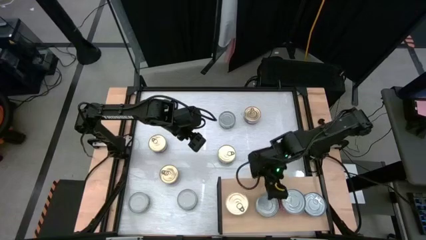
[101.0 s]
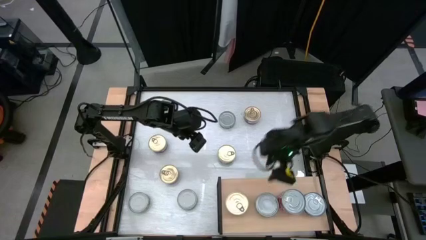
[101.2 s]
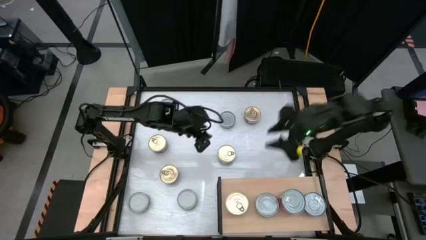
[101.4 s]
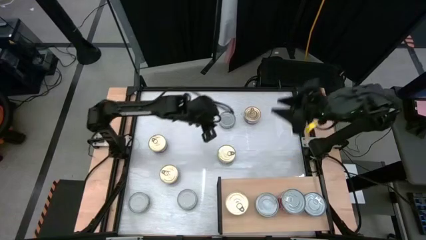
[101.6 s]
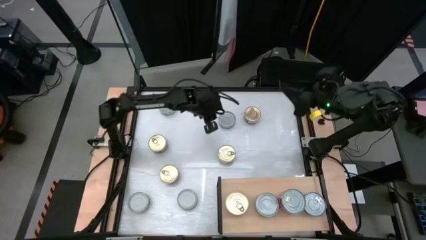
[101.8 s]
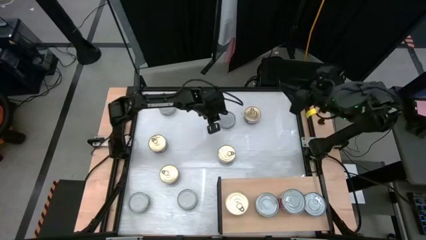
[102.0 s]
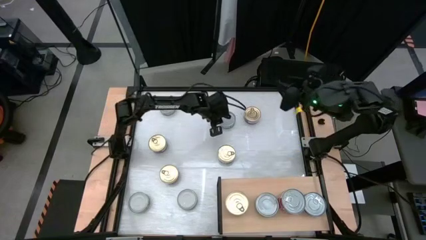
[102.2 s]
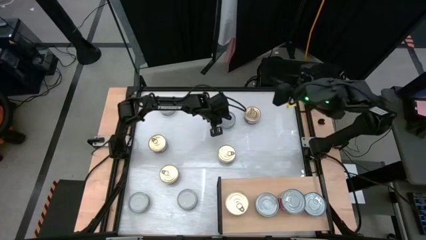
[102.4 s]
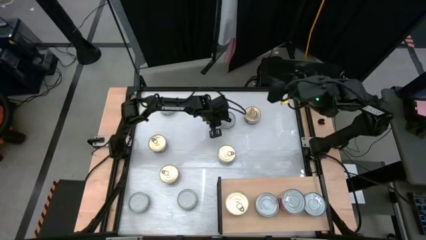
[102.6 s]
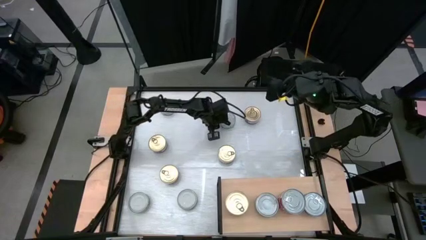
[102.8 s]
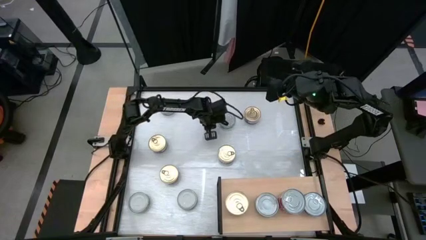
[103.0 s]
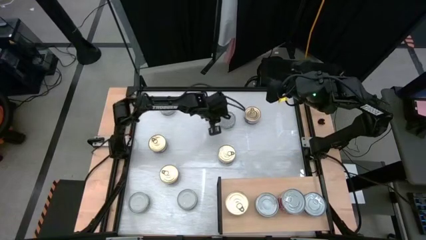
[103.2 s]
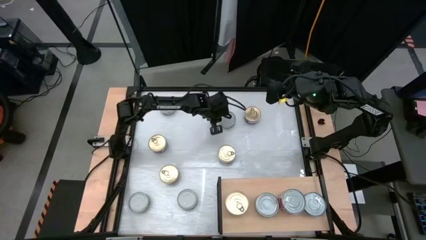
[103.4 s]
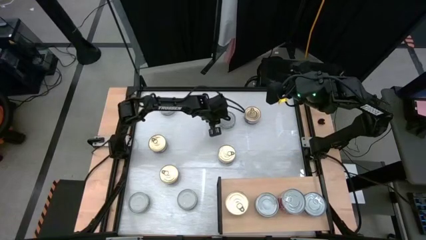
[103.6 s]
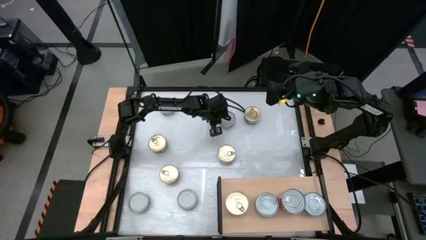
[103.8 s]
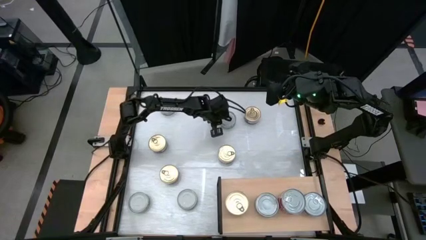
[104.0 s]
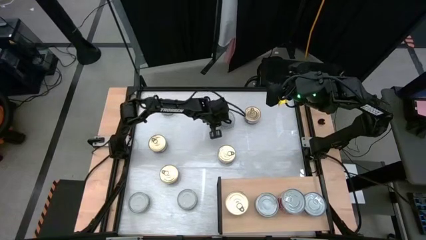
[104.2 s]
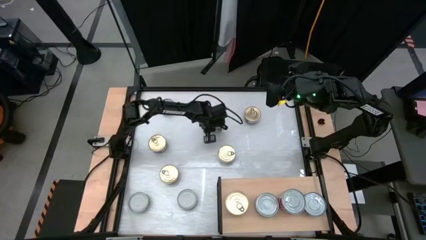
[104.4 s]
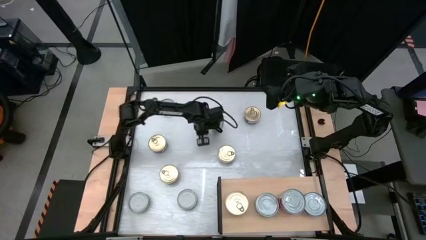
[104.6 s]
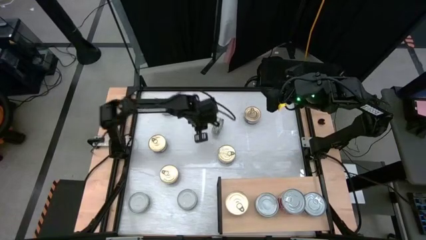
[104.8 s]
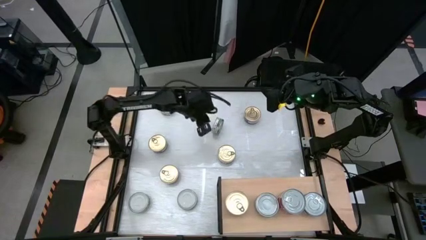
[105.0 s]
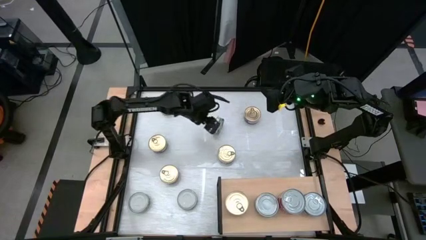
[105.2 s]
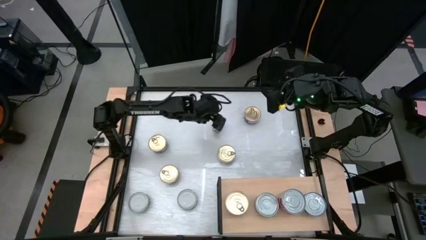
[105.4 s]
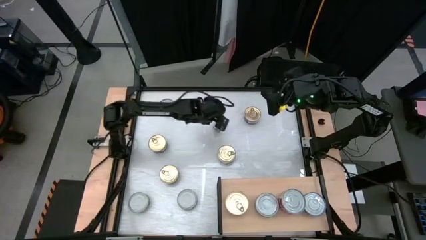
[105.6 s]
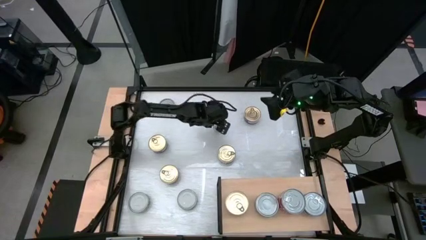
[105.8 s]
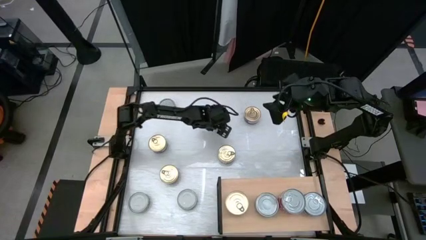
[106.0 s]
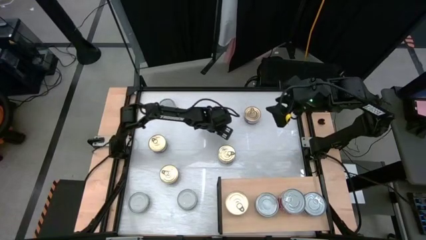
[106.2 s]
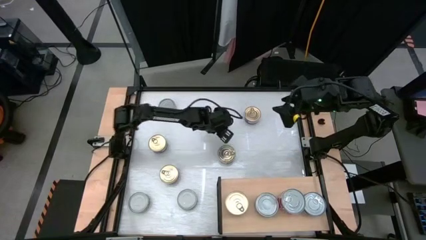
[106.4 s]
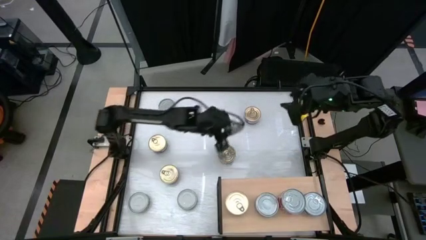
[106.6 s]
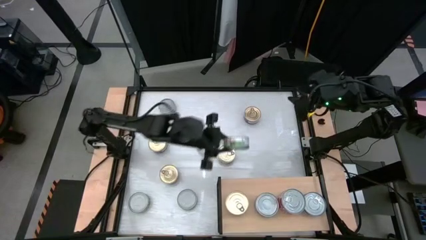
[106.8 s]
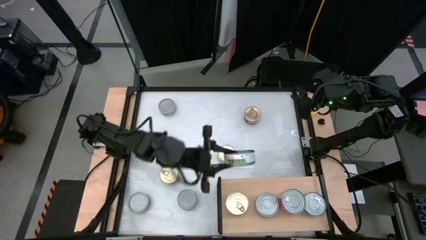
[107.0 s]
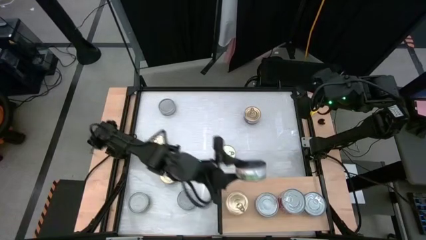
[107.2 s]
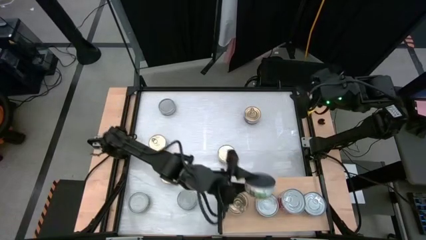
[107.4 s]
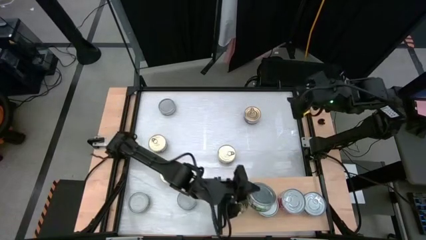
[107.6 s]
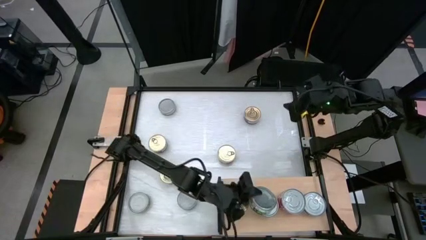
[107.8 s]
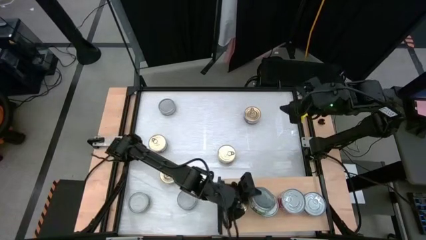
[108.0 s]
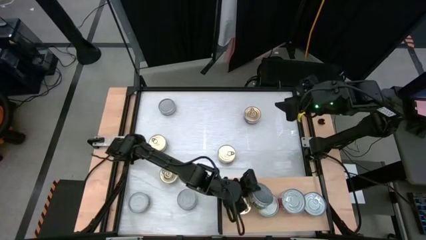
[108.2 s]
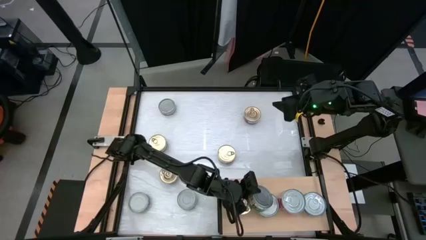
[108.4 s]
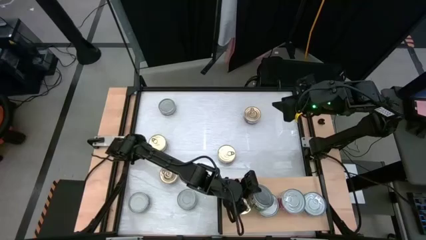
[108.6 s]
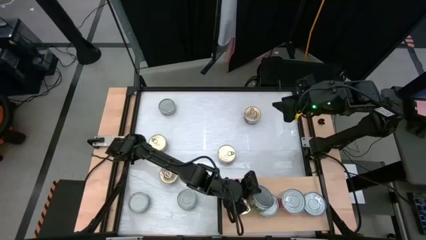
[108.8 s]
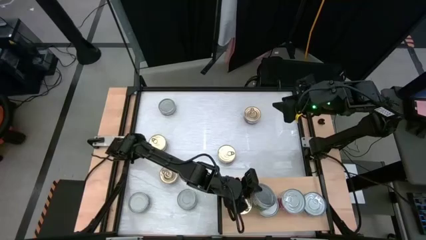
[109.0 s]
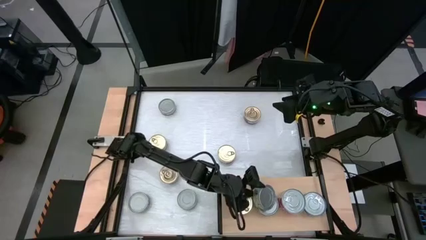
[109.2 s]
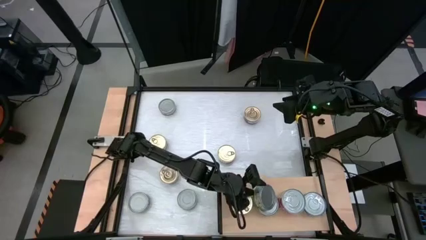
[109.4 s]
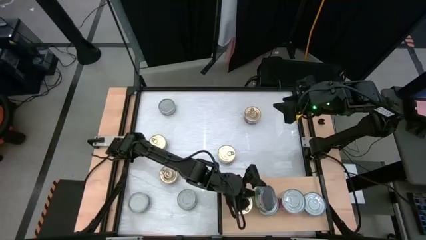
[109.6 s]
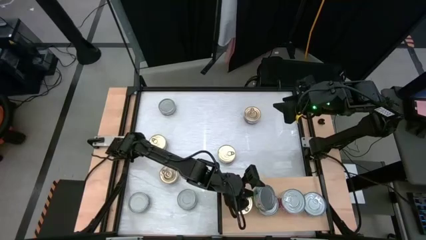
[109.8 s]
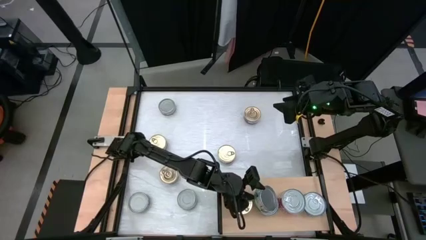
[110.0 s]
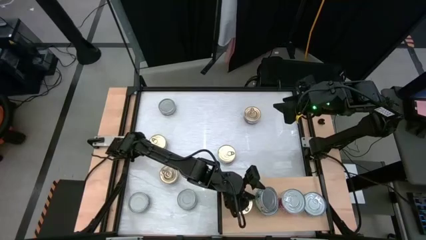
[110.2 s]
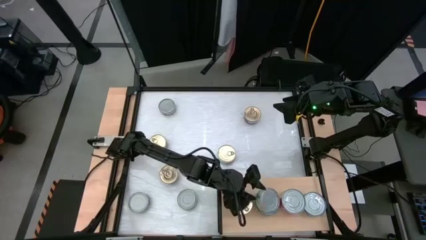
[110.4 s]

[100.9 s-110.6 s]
Task: Stack canned seafood by type on shelf
Stack the green tuna can on top of the other green tuna can on the shelf

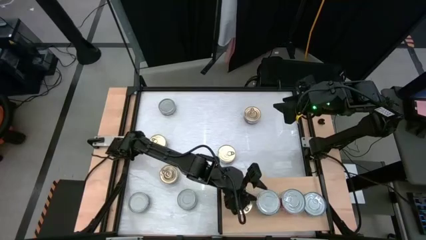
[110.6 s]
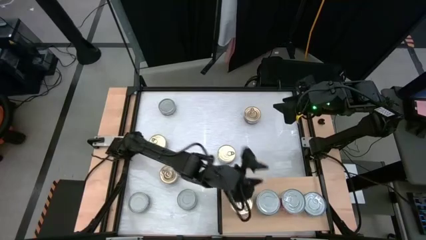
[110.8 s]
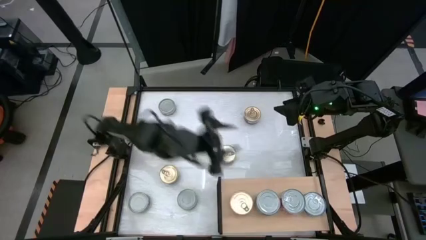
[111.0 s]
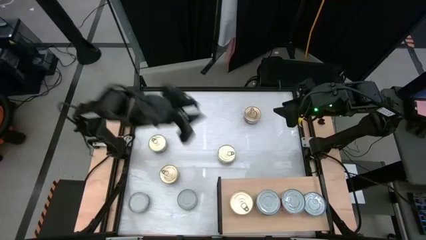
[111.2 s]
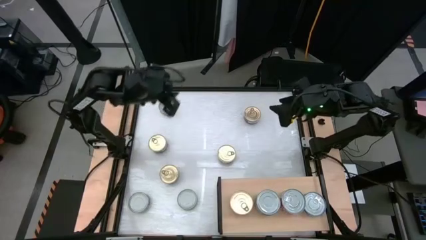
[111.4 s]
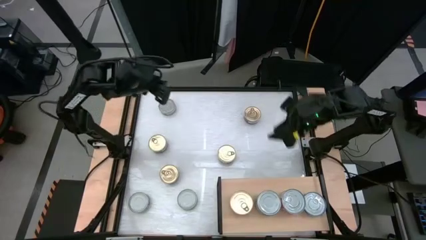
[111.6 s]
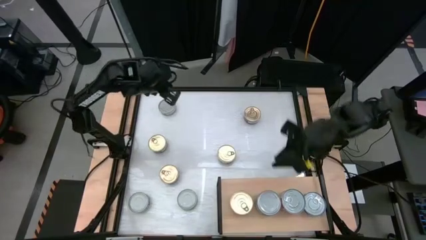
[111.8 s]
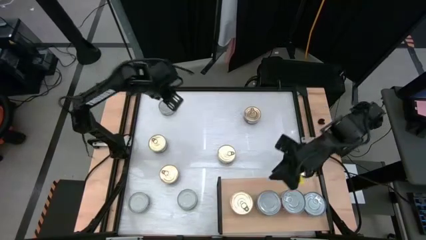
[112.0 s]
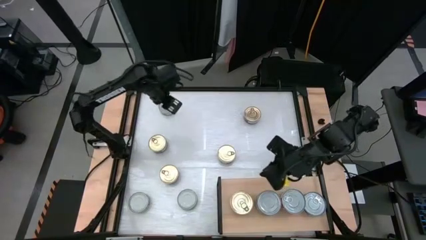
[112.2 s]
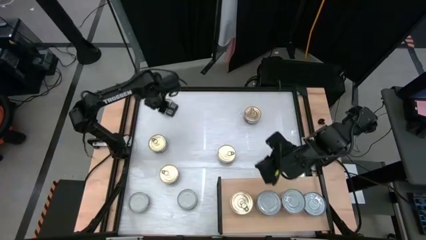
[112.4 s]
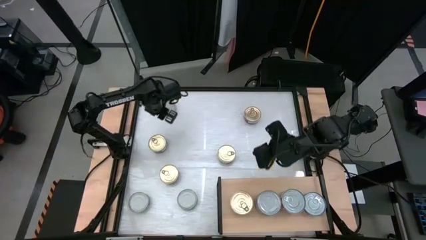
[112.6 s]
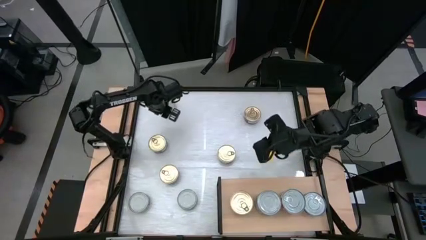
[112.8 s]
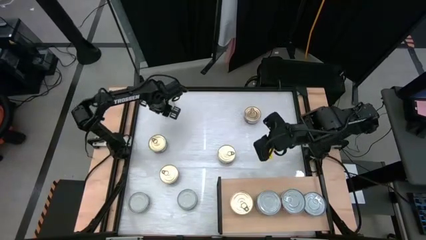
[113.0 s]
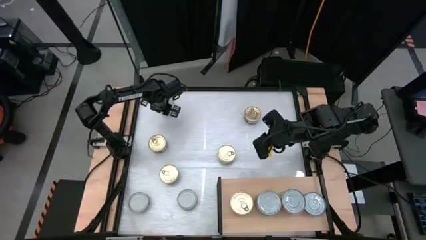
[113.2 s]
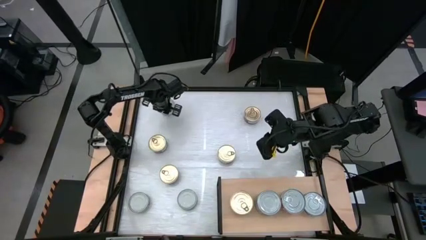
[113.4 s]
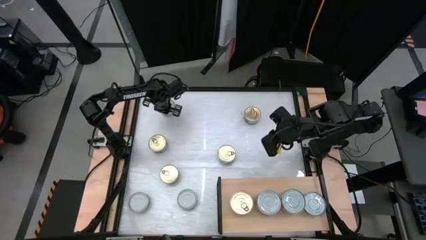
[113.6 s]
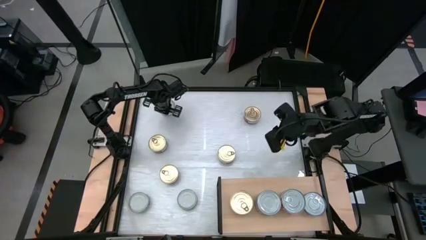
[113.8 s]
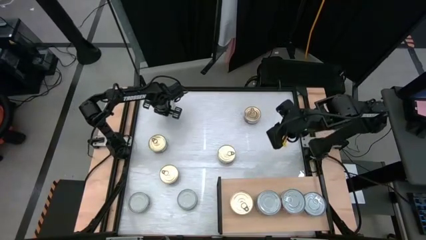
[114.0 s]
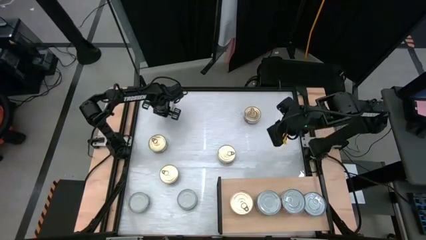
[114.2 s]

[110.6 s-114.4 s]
Stack the green tuna can on top of the other green tuna can on the shelf

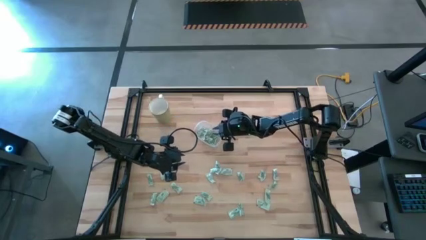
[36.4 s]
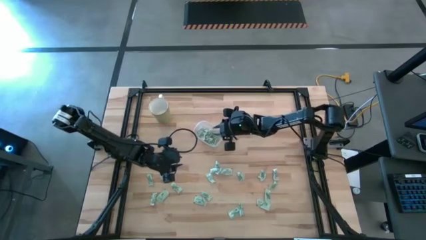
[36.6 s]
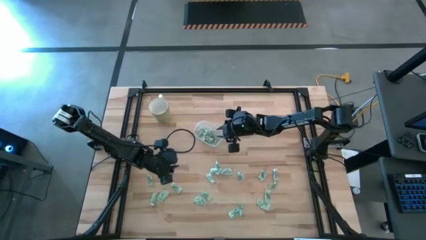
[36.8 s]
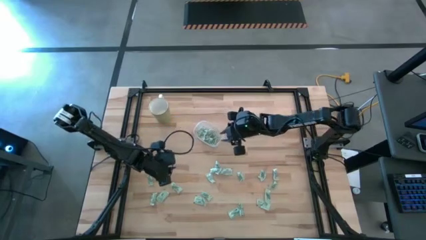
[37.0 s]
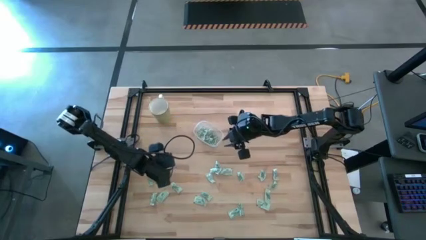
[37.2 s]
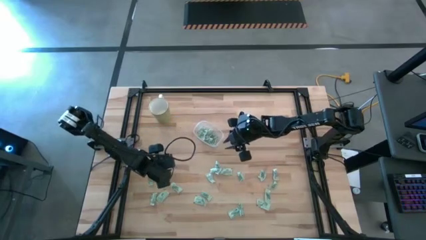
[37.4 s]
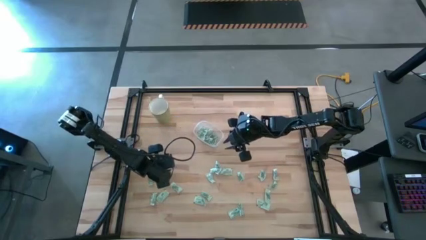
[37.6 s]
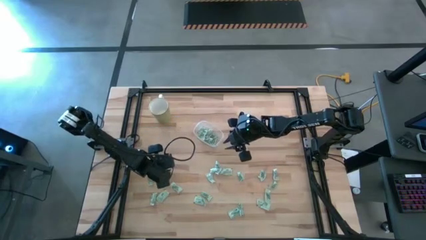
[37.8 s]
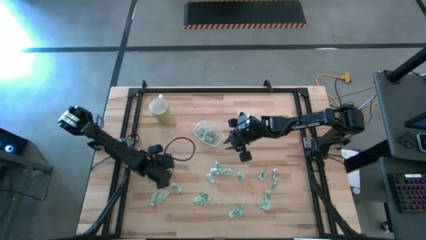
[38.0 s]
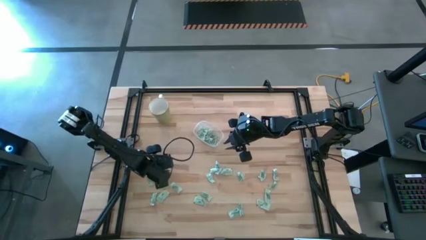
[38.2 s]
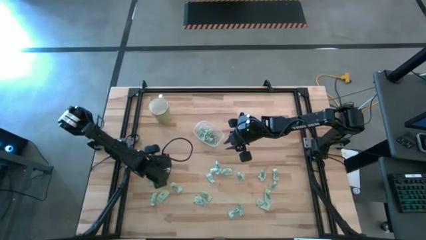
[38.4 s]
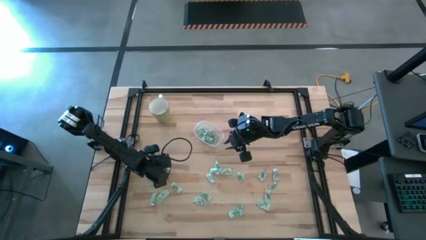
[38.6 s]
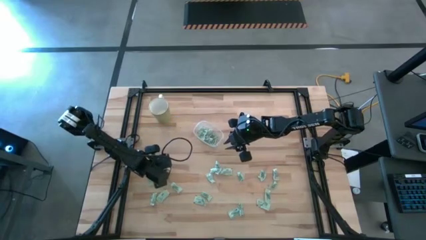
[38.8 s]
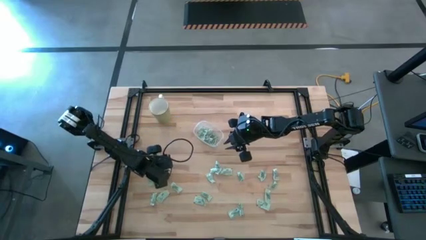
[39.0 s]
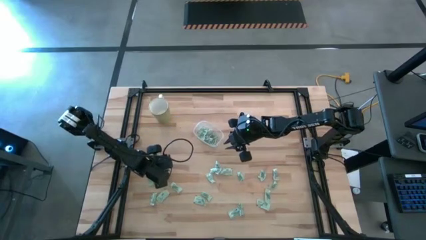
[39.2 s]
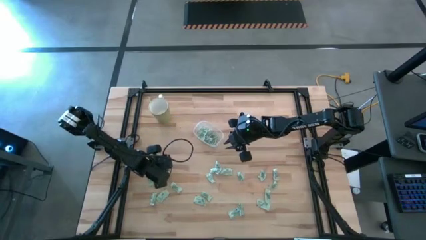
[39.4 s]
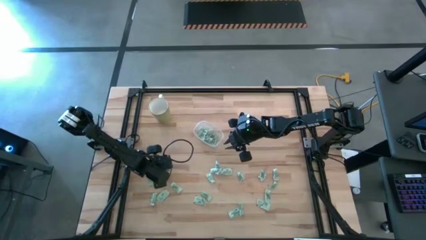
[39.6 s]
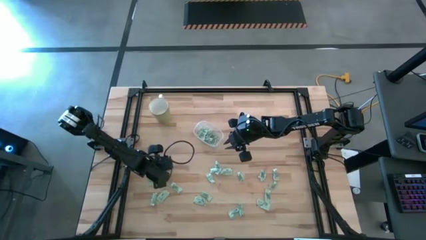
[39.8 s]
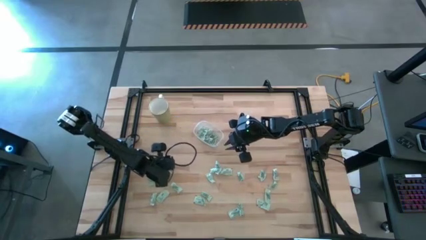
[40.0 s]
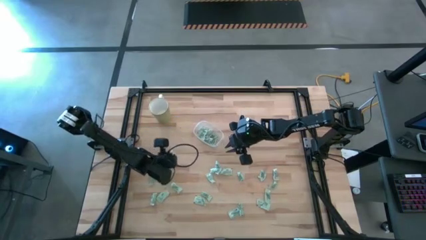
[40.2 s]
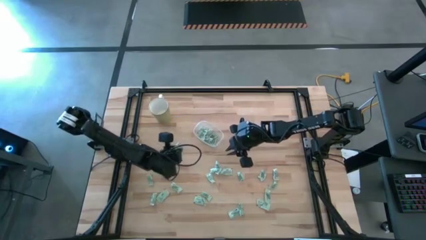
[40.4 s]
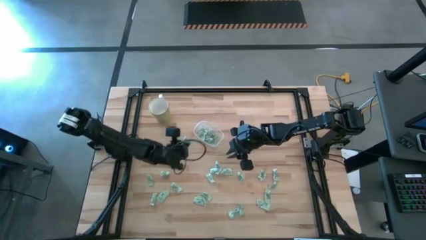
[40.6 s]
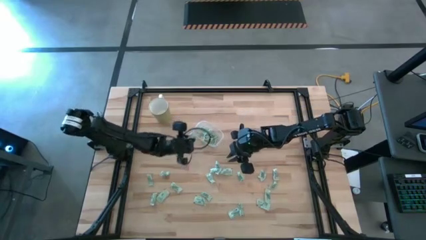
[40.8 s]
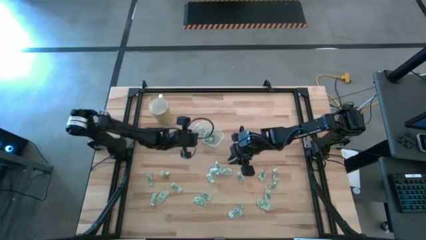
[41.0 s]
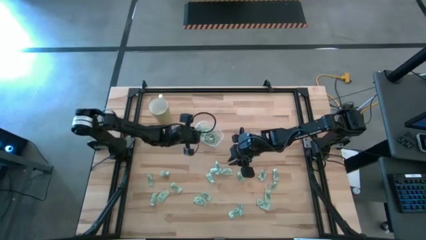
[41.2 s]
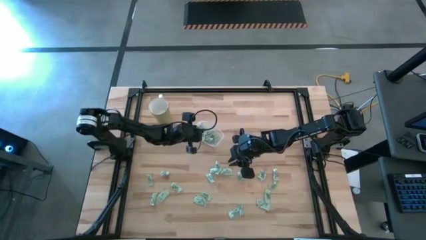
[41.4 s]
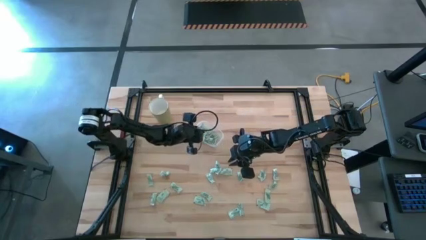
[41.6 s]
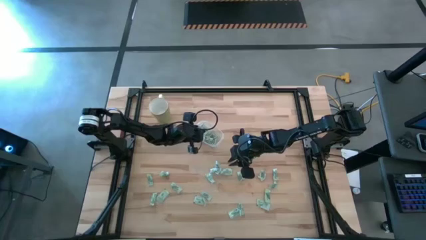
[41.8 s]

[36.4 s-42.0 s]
Task: Pick and place Stevia / Truvia into bins
Put the stevia packet into the transparent container
